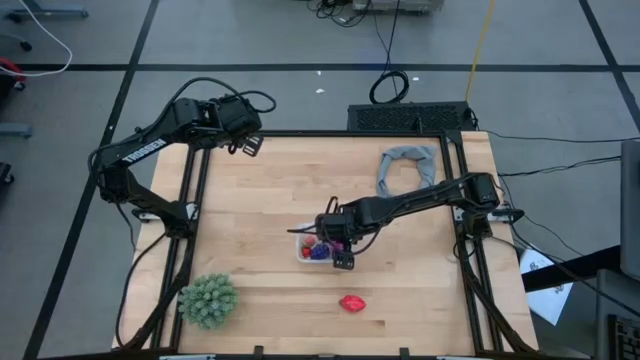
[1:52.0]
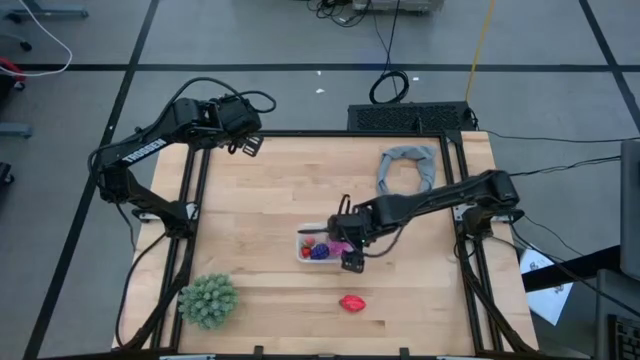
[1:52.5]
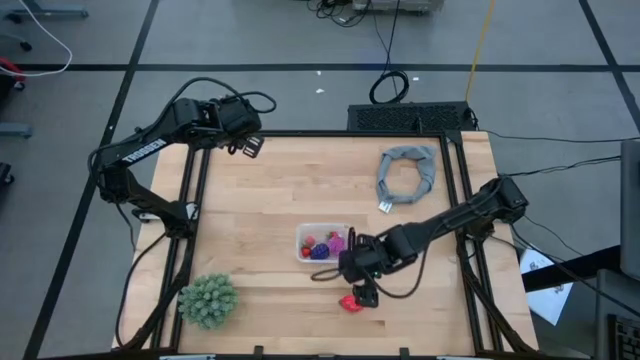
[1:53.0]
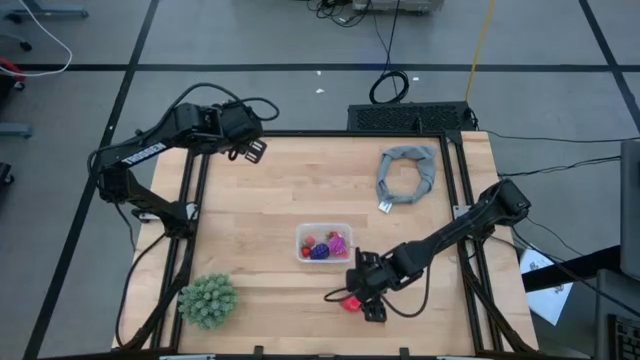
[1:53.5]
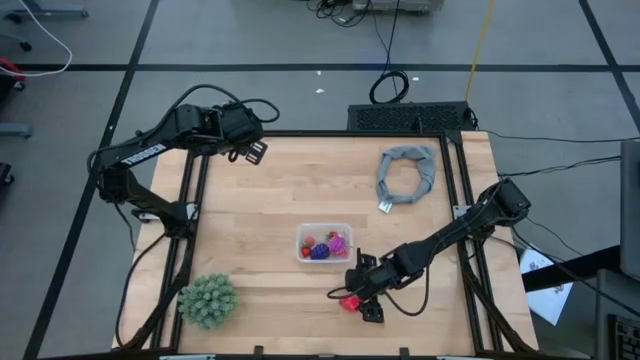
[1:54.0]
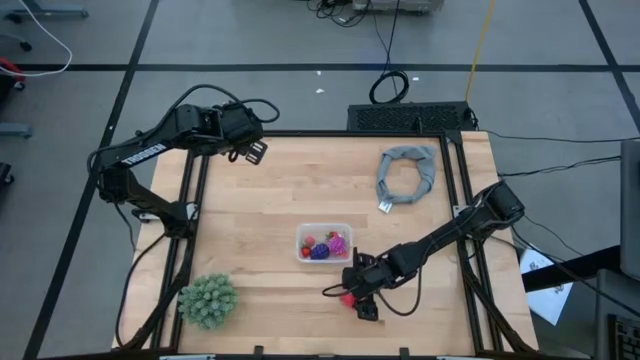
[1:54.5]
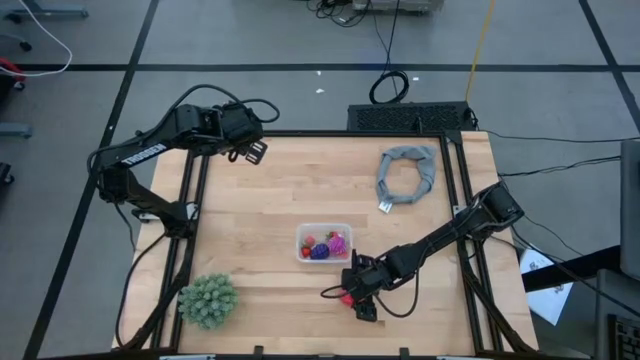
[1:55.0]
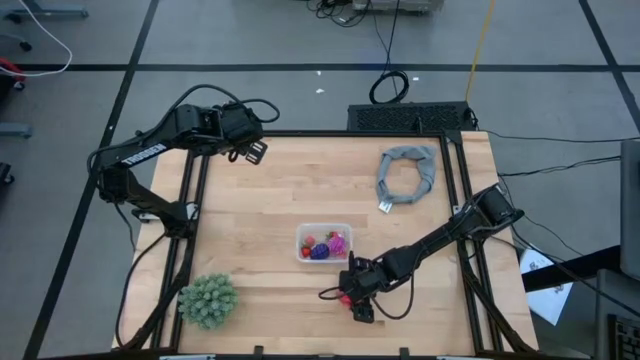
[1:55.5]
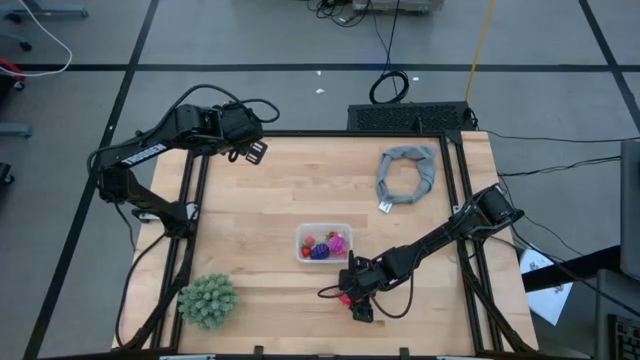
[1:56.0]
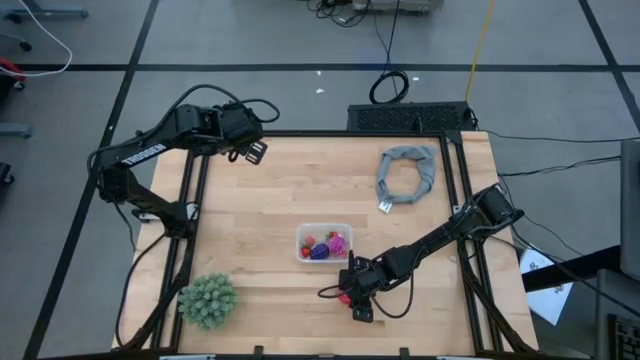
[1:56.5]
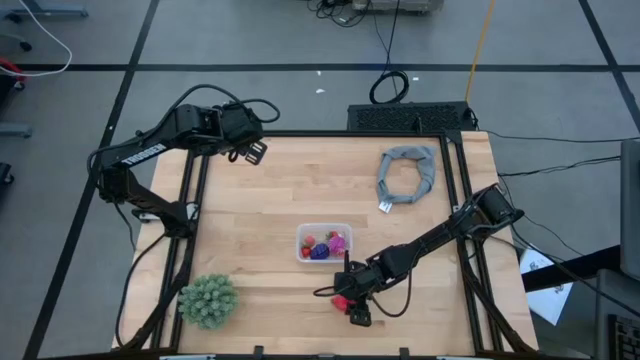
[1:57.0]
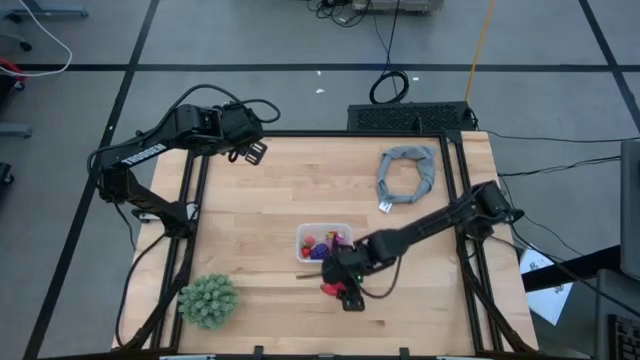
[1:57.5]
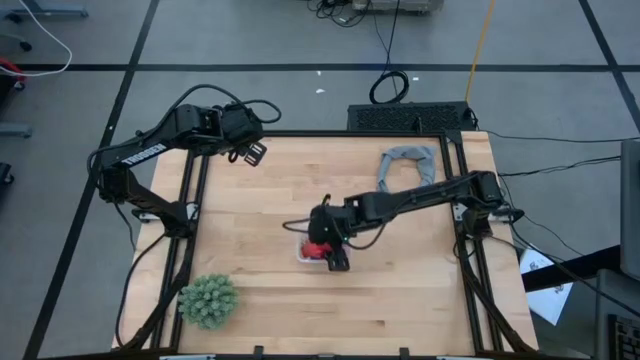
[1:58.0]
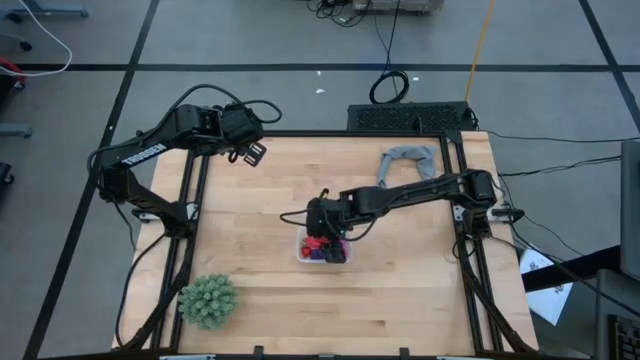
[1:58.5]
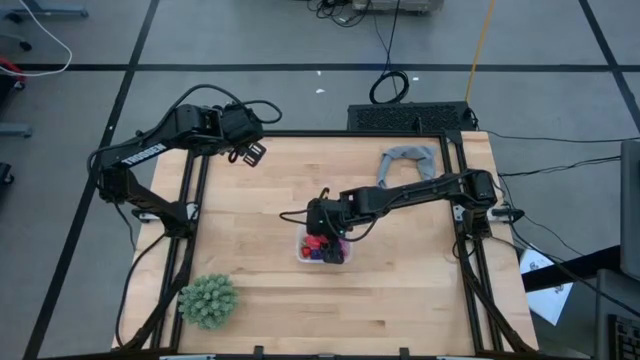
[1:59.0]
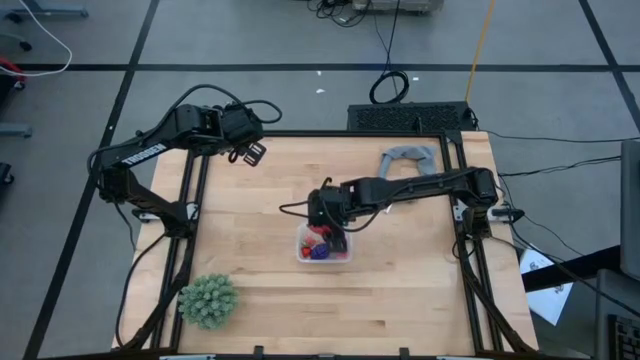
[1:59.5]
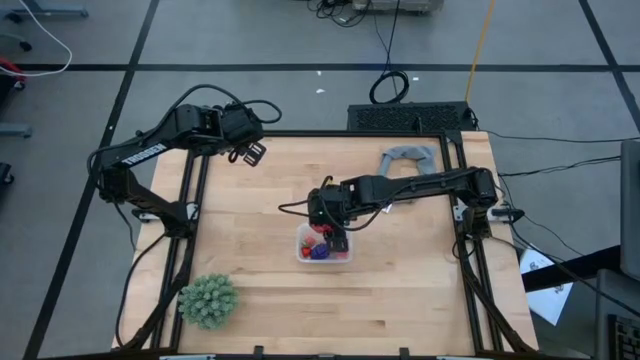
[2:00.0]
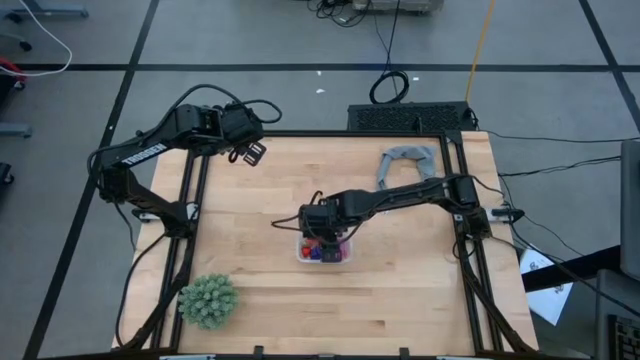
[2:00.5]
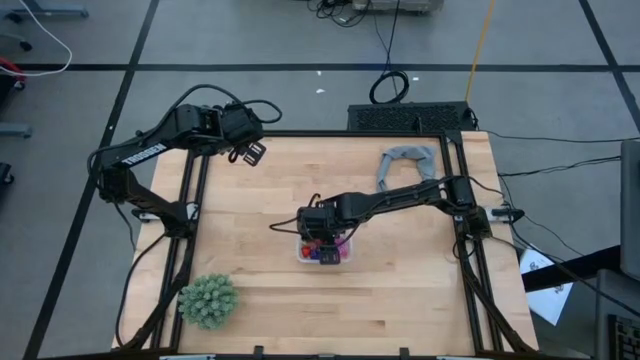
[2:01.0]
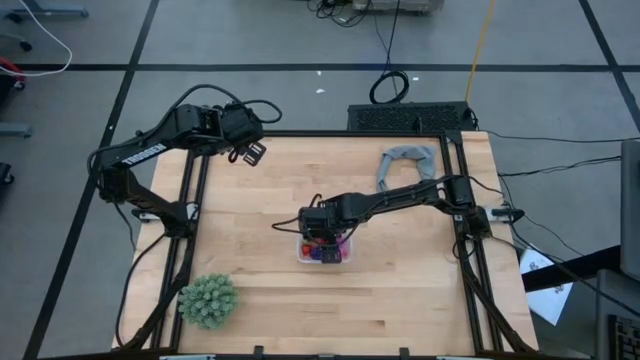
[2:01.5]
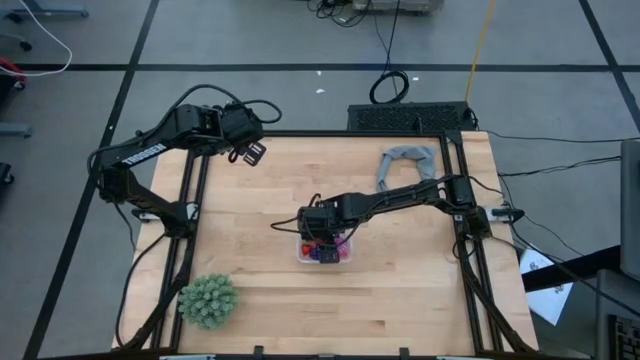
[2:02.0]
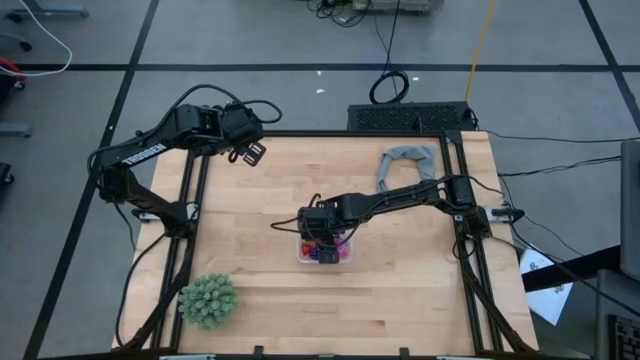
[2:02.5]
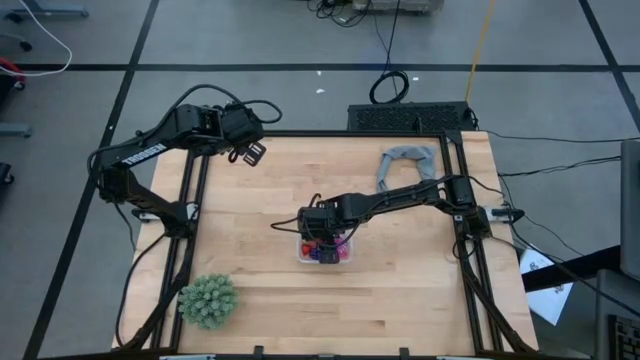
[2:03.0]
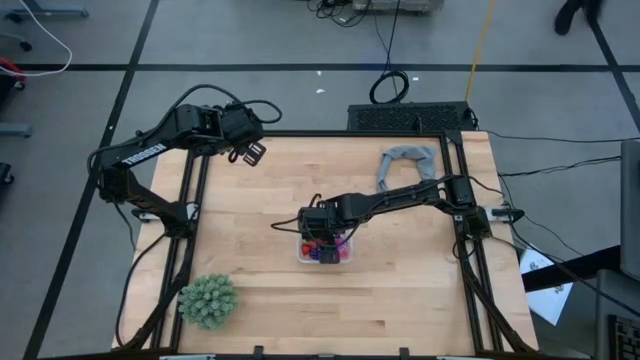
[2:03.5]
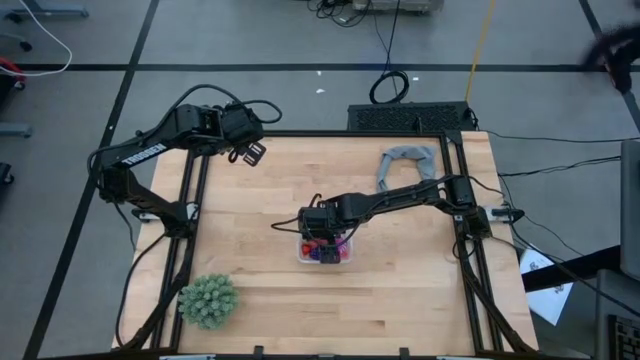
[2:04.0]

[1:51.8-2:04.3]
Task: Pick and placing Produce into tupperware
Put the dragon fruit into the bin

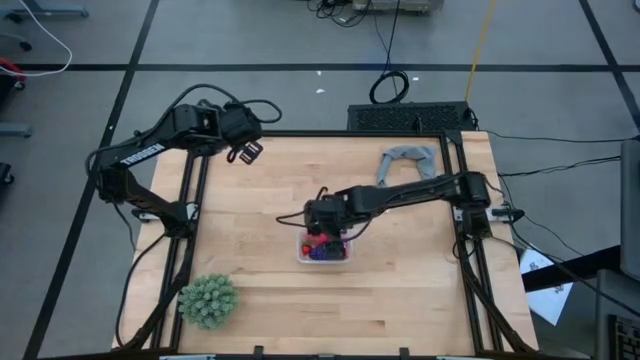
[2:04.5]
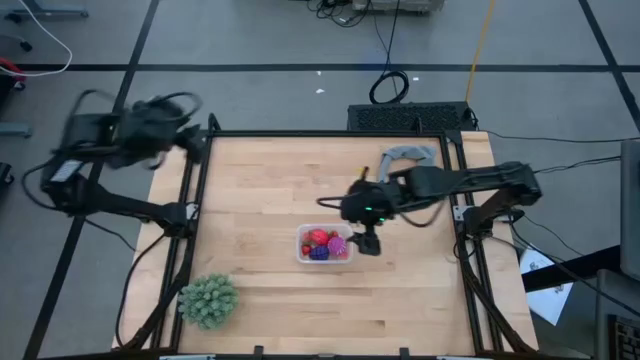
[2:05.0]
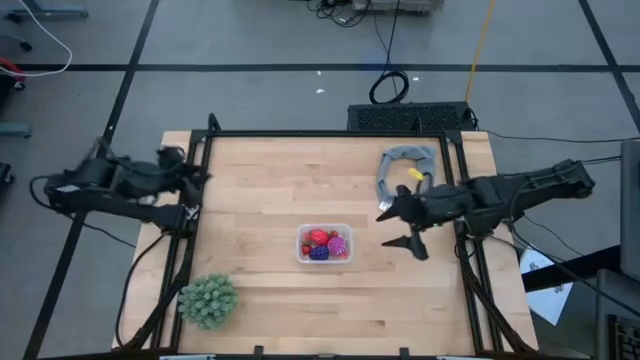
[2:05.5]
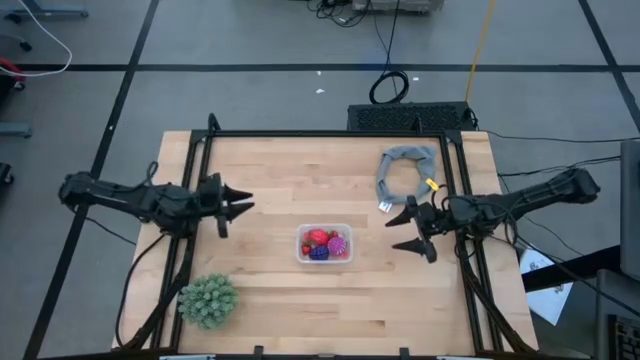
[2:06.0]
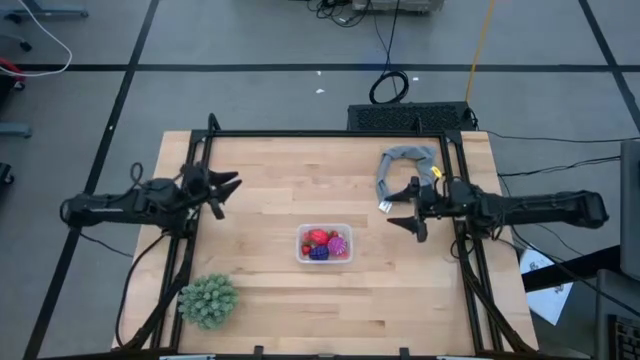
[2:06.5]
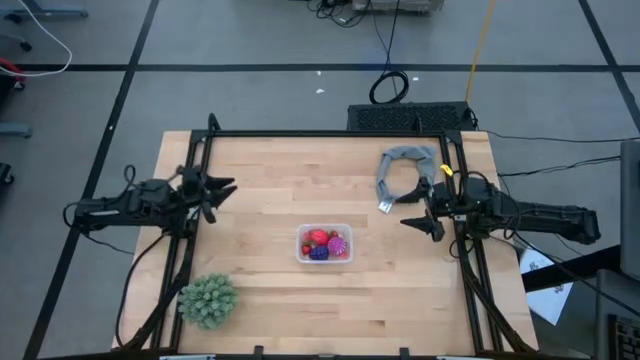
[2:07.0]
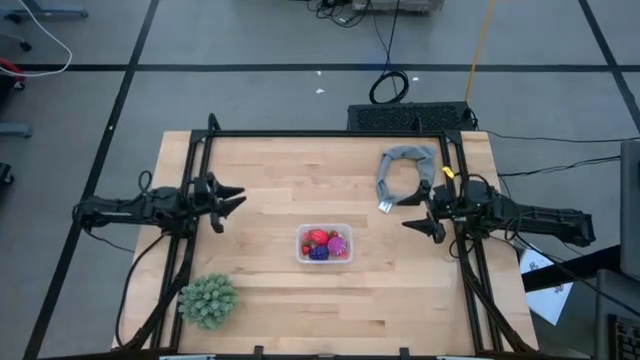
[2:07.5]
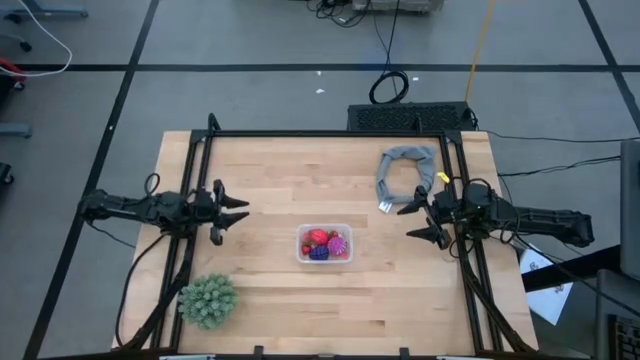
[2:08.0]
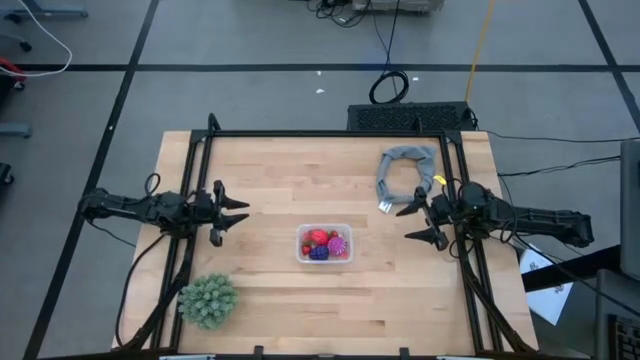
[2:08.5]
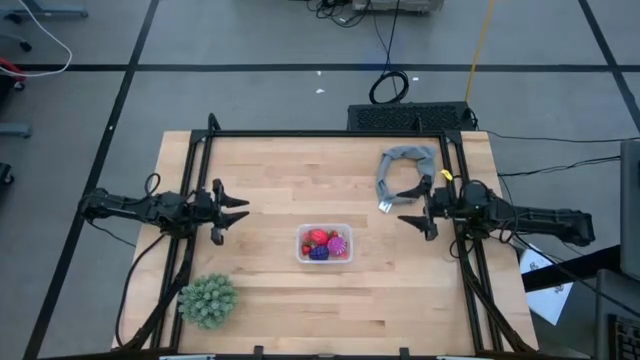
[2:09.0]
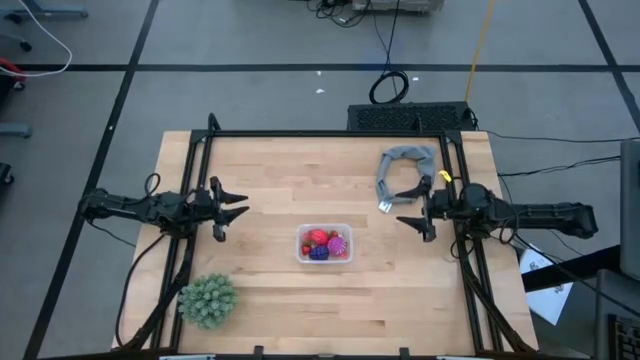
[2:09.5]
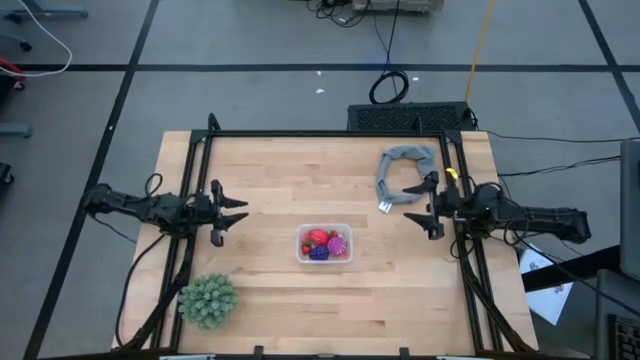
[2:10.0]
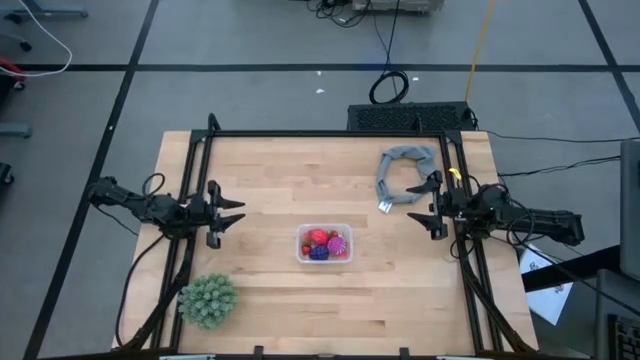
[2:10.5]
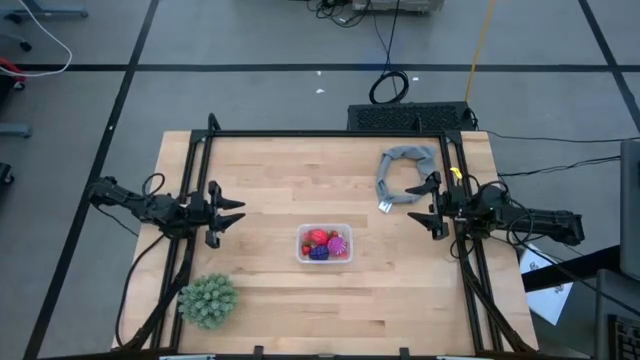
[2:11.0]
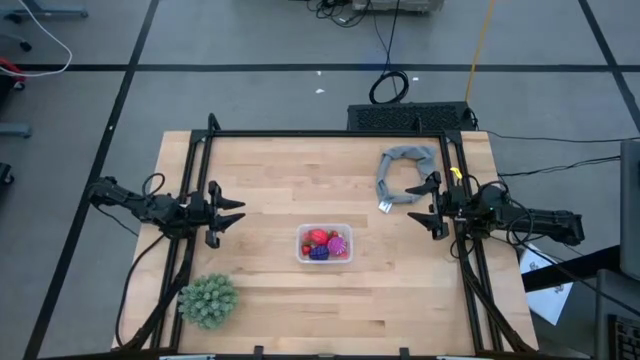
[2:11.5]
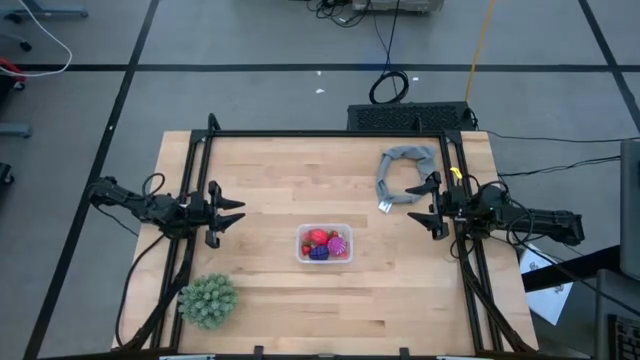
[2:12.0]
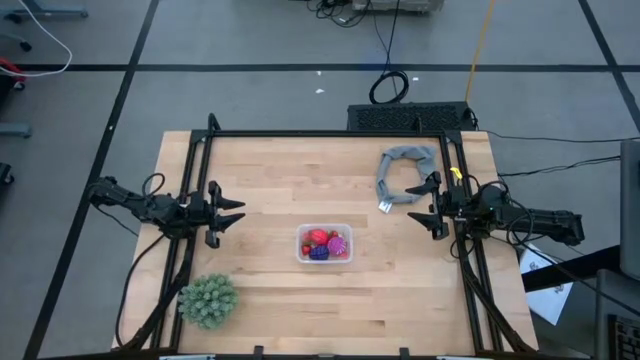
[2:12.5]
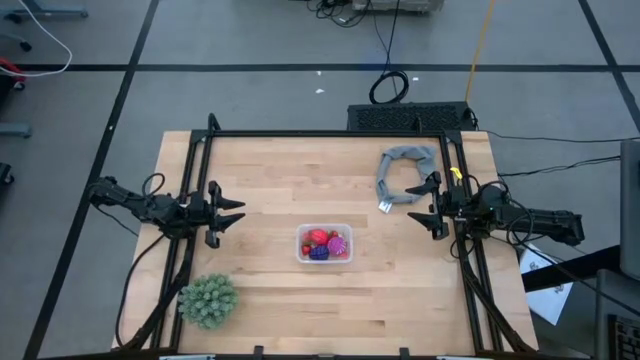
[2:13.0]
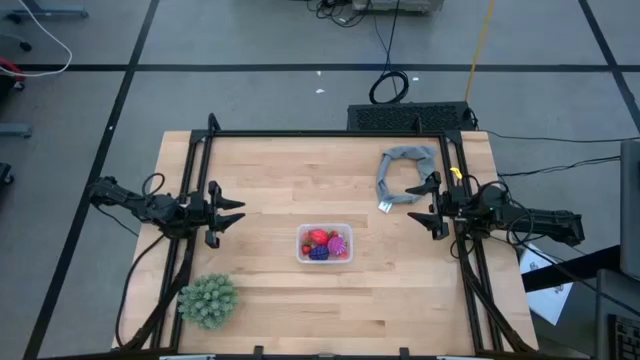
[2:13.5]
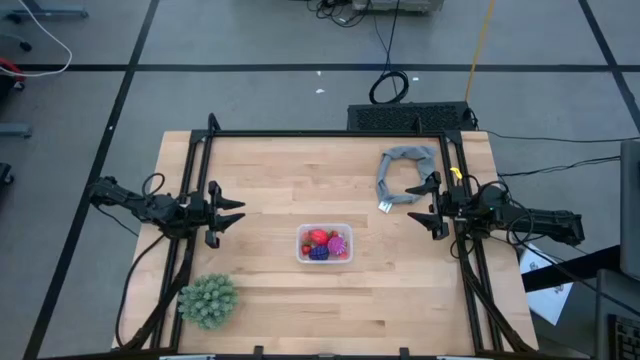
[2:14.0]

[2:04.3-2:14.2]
Return to Home Position
